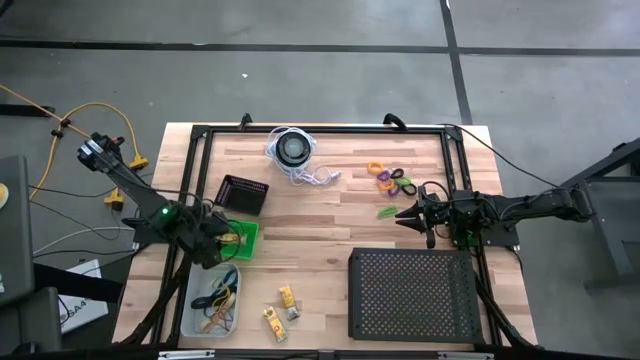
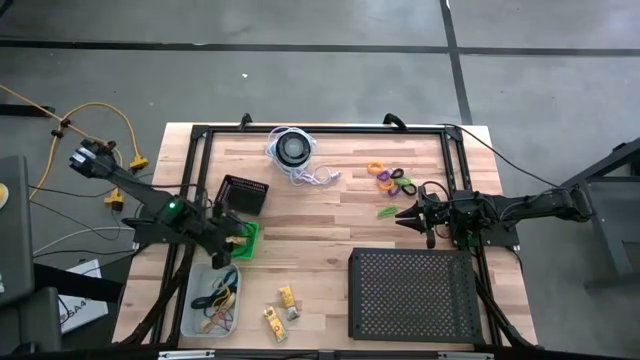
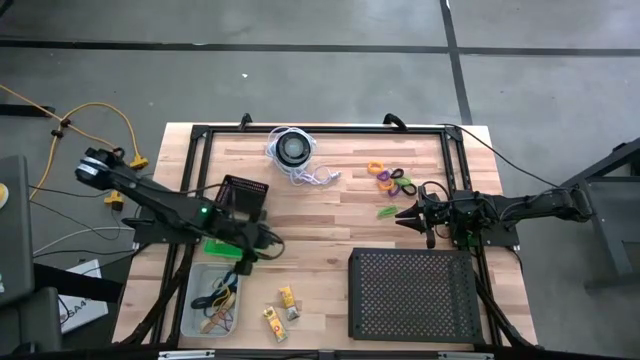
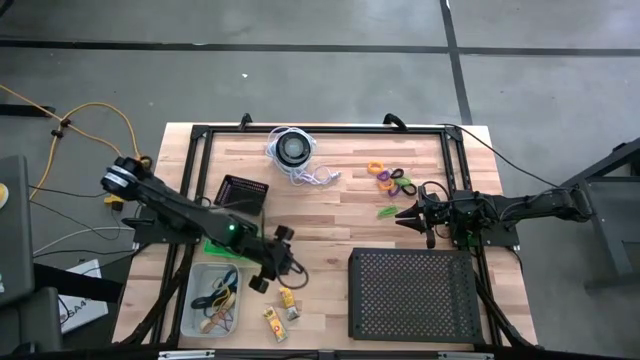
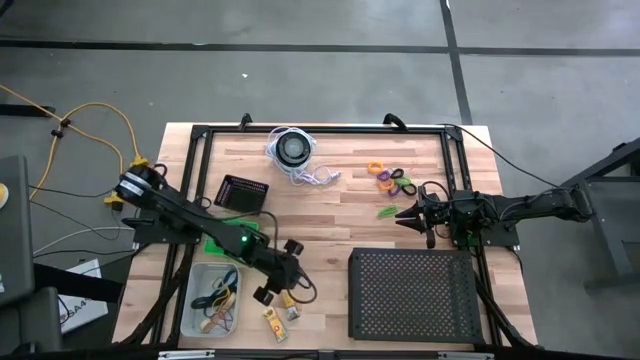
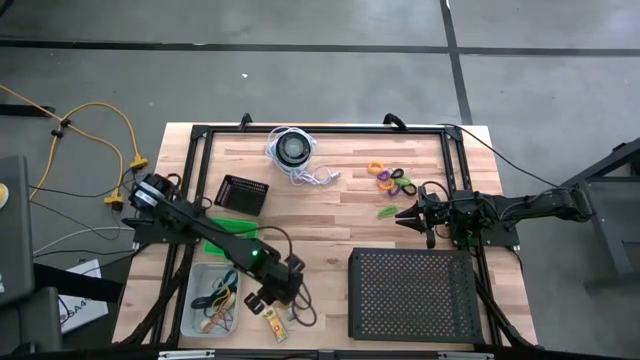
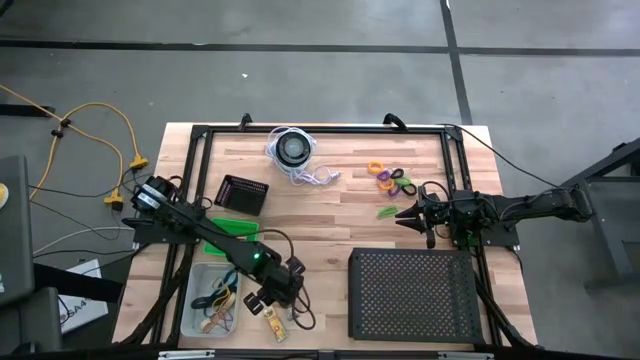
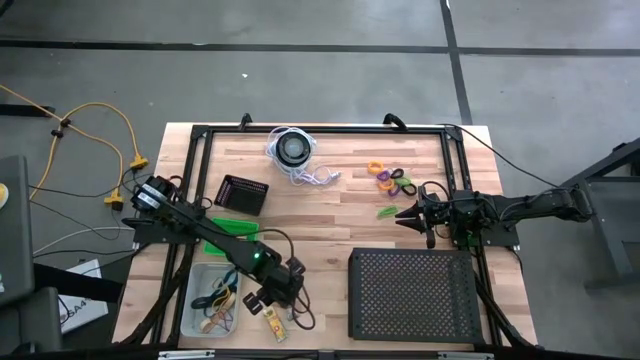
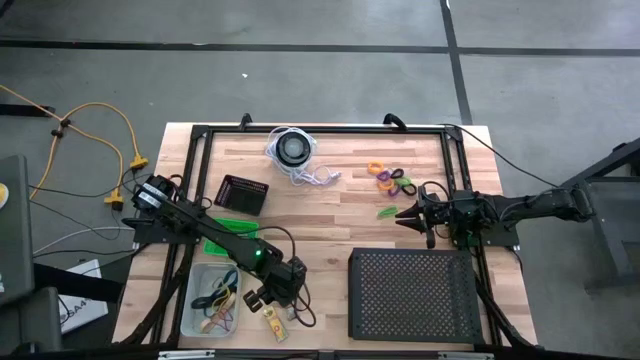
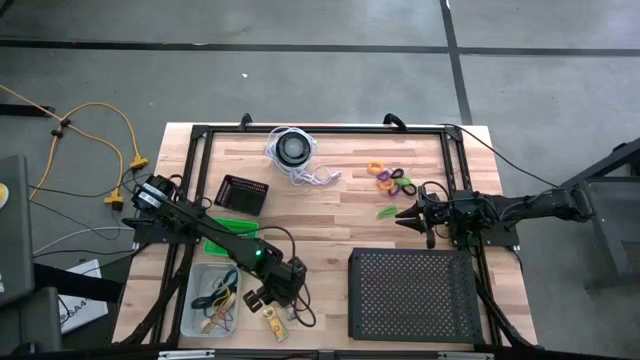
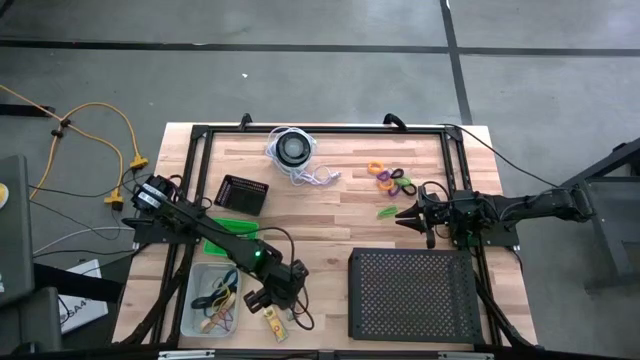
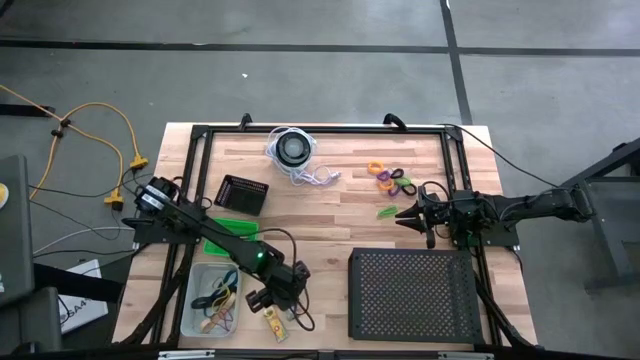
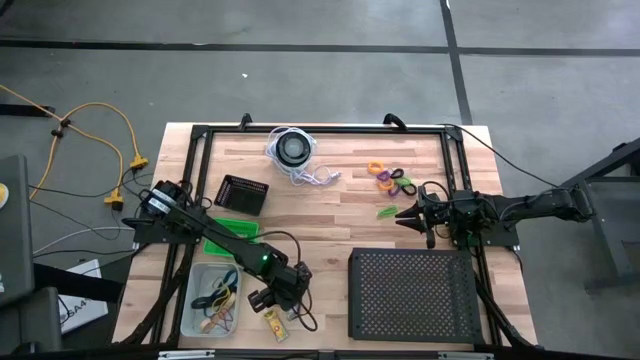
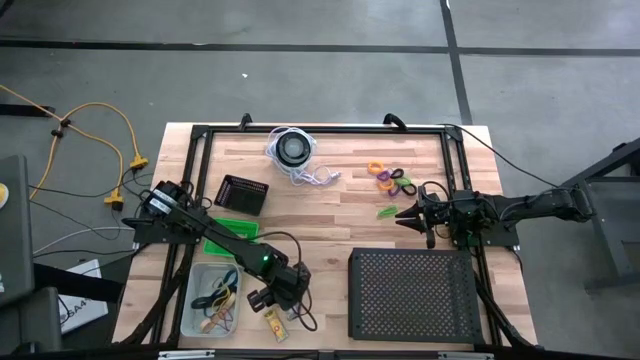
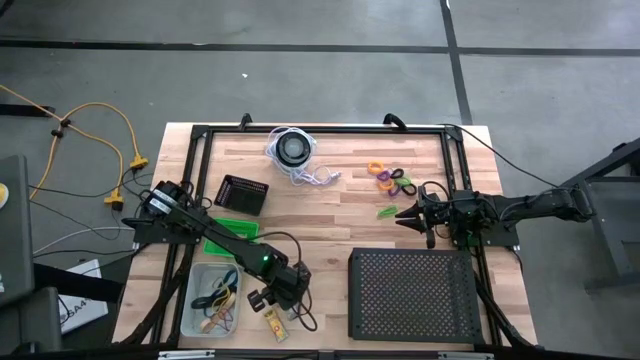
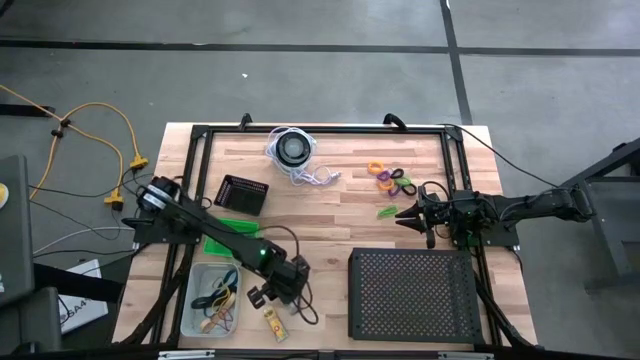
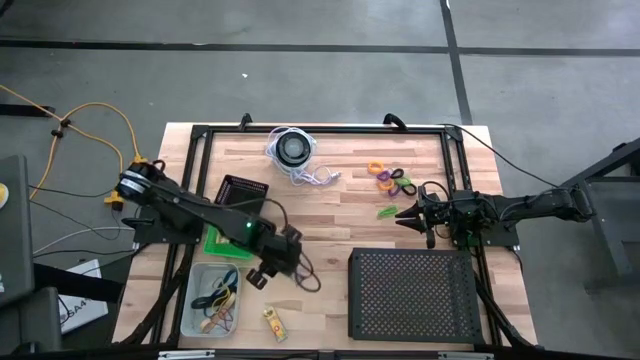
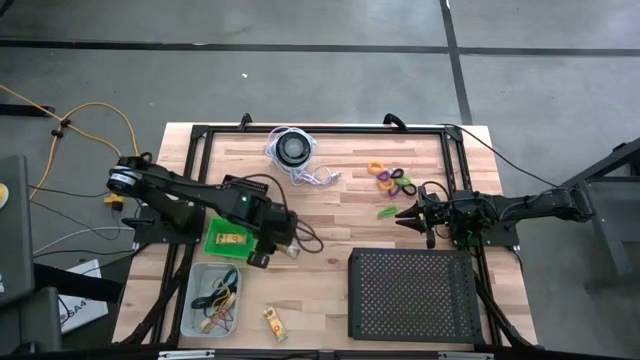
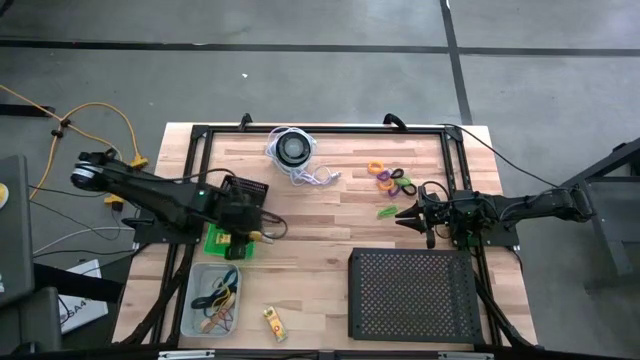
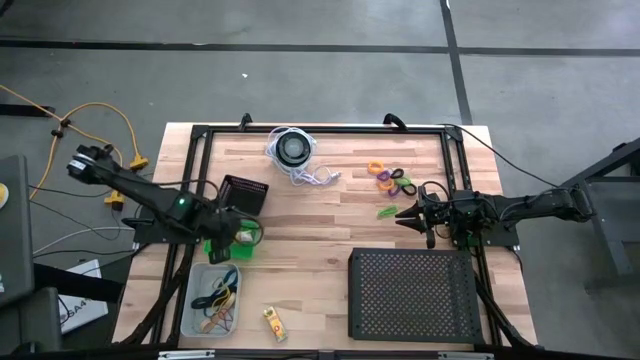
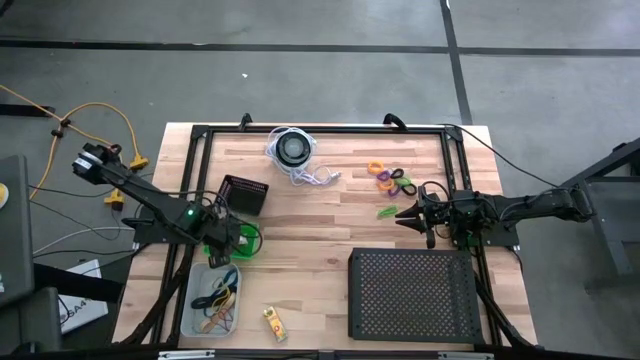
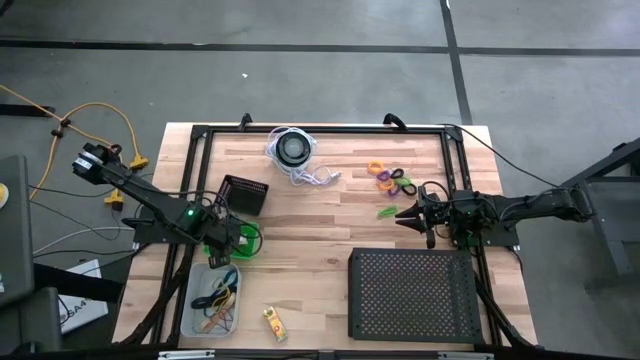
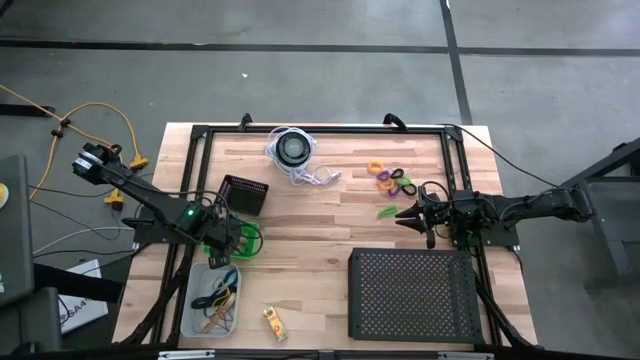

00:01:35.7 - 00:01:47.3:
Task: Pick & Place Office Desk Supplies
Put the top crayon pack into the green bin

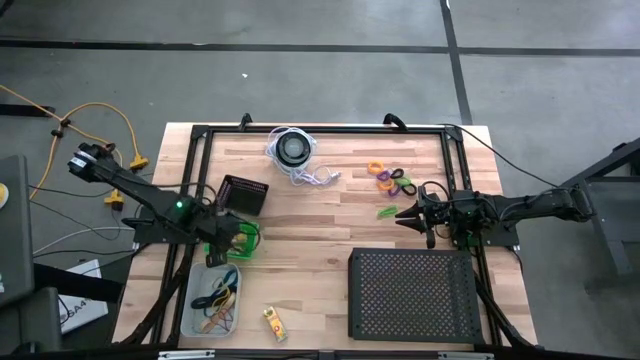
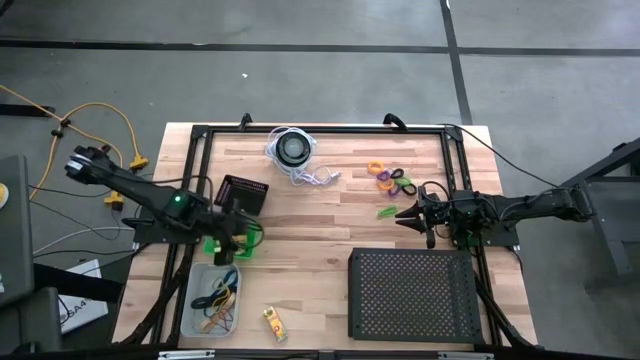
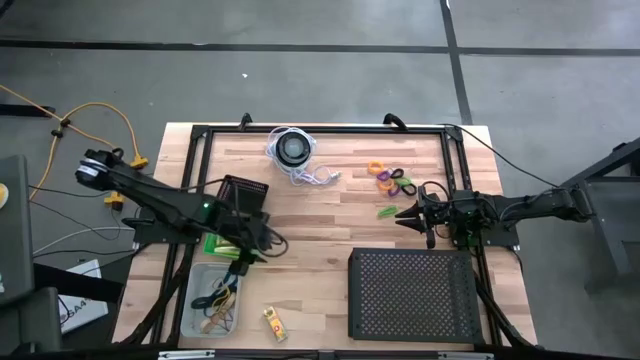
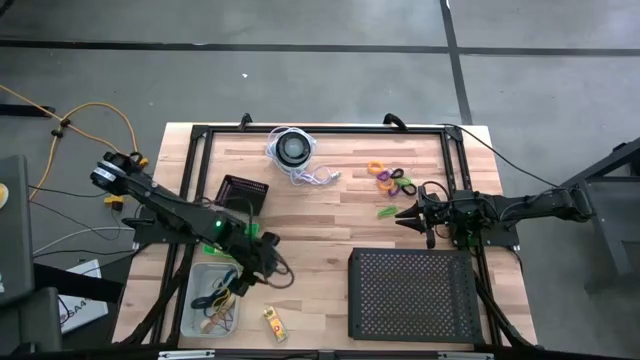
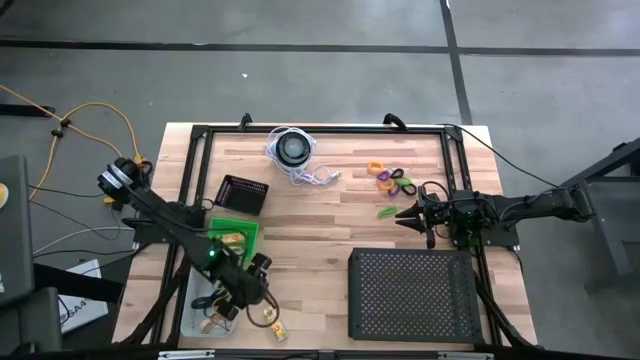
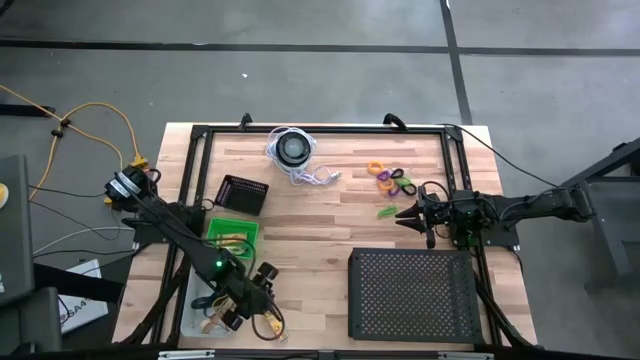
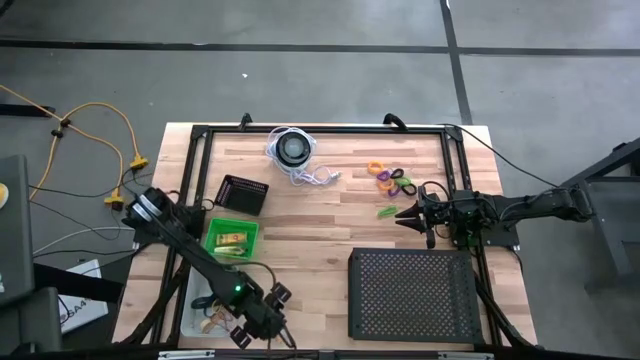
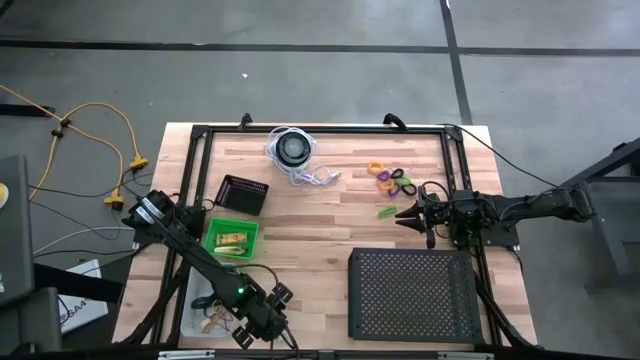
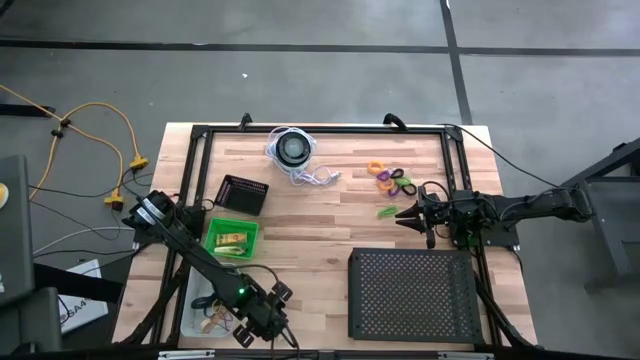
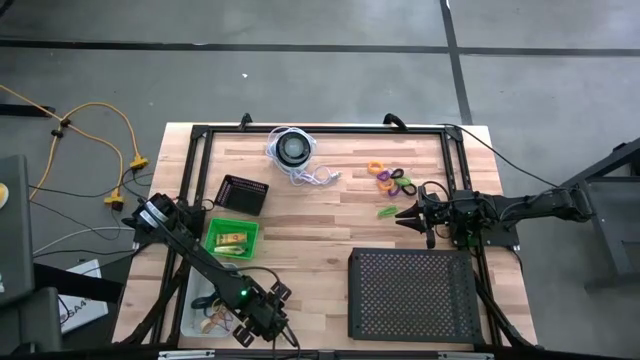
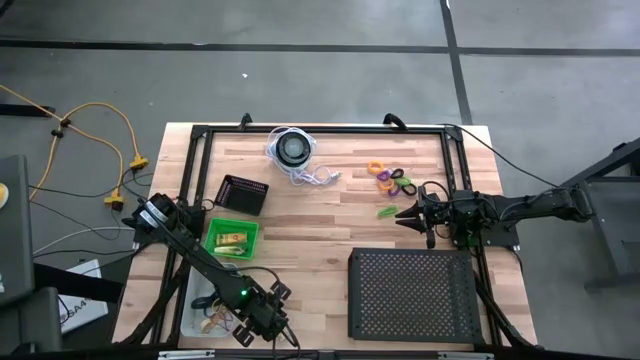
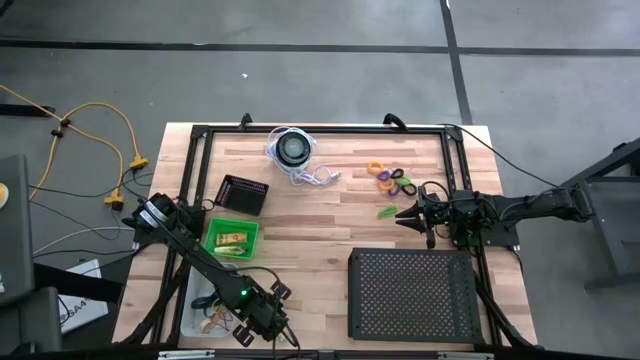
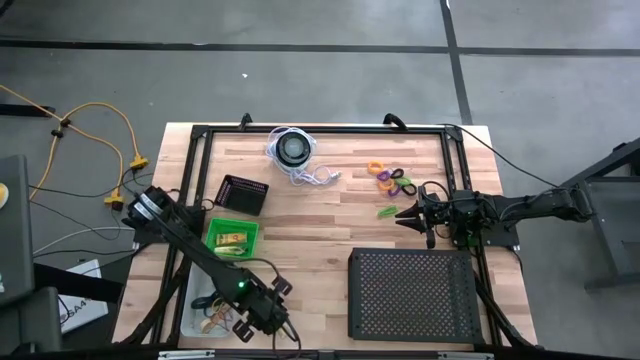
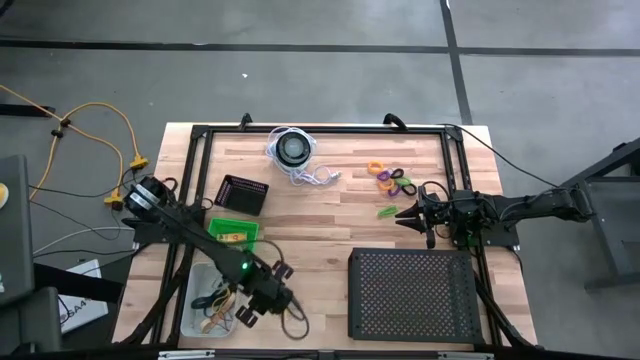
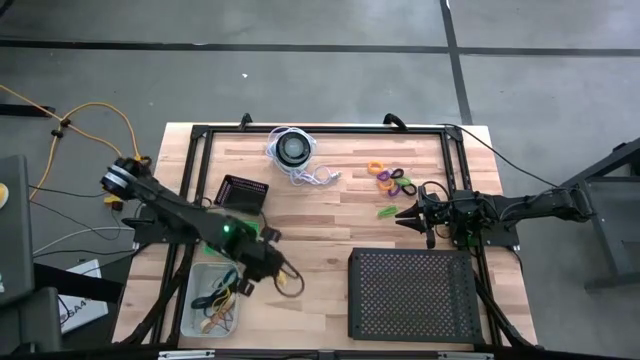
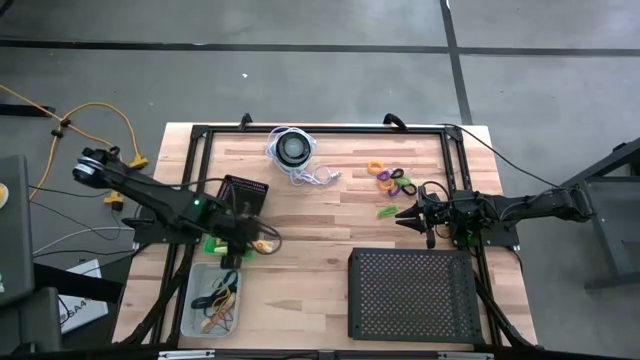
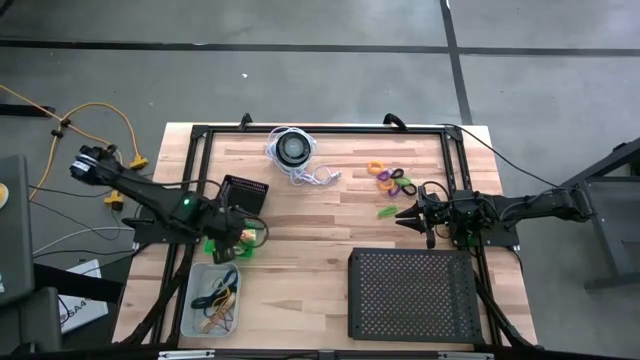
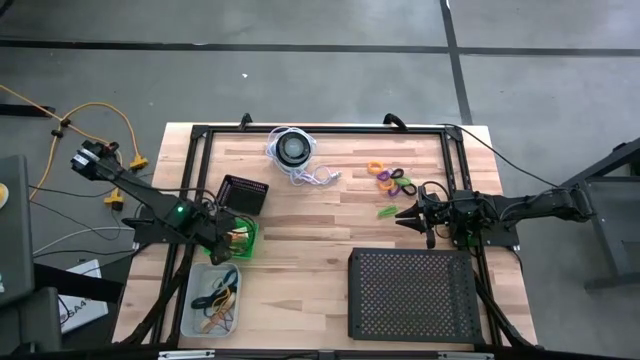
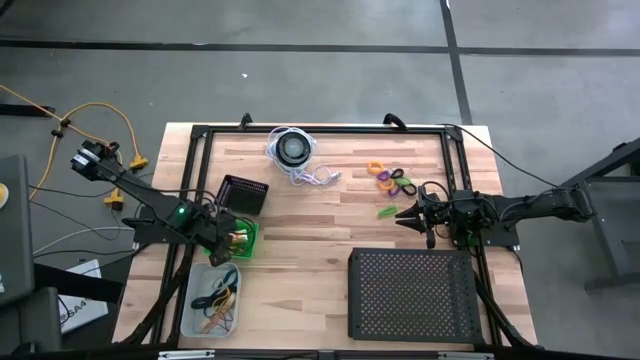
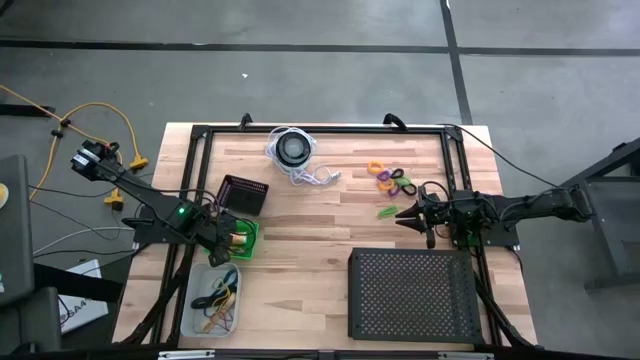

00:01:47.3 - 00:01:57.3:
Put the crayon pack into the green bin

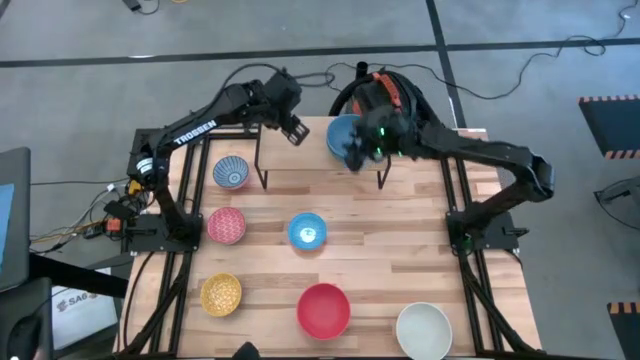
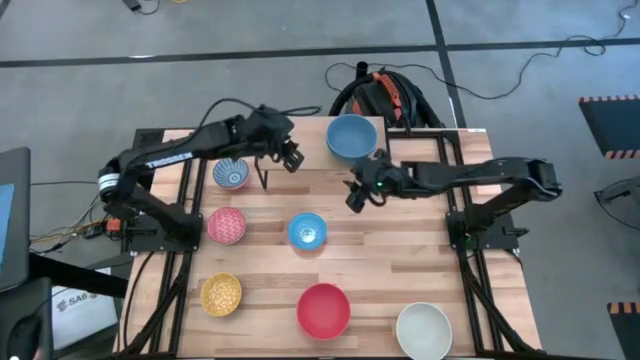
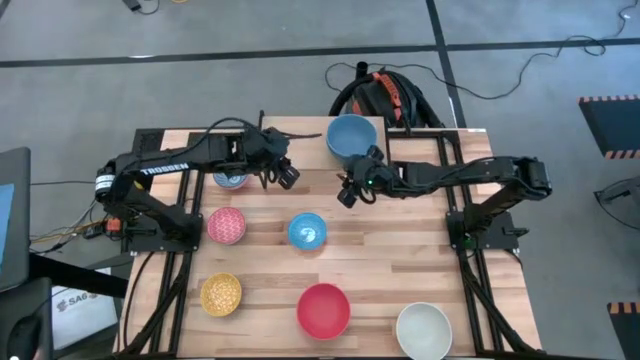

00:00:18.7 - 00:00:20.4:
Task: Place and stack bowls onto a shelf
Adjust the stacked bowls on the shelf
